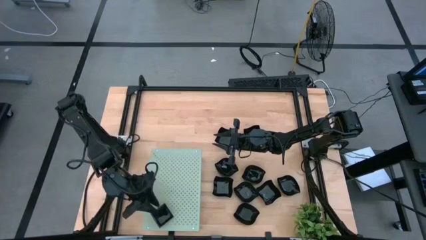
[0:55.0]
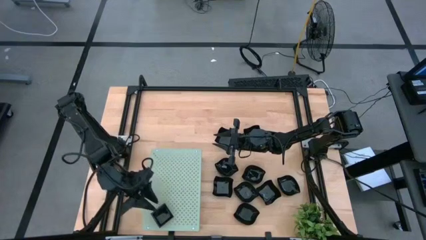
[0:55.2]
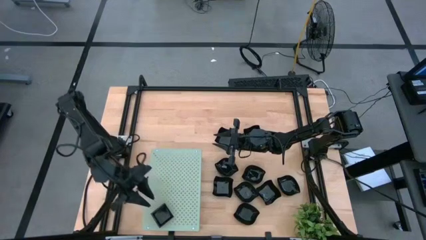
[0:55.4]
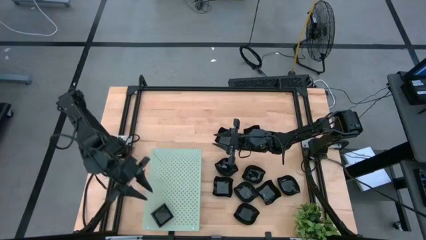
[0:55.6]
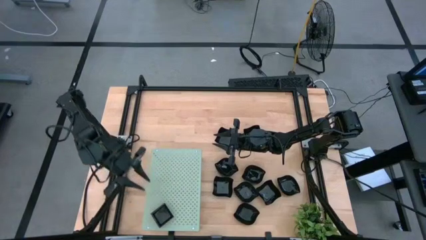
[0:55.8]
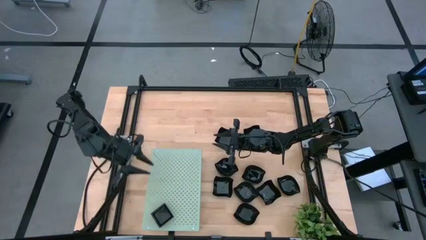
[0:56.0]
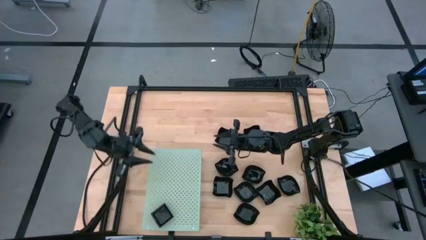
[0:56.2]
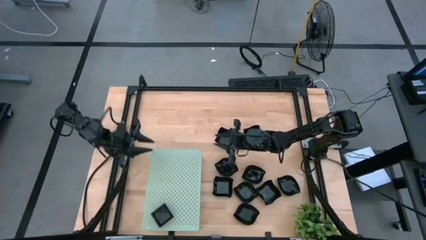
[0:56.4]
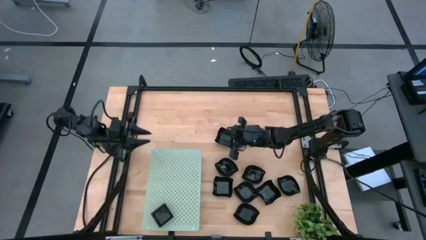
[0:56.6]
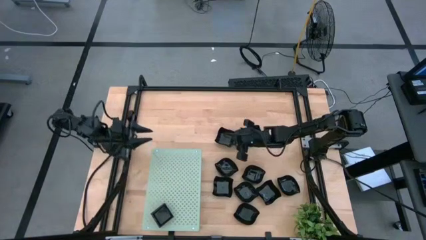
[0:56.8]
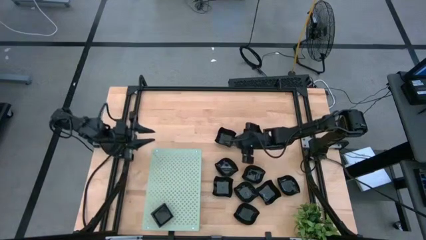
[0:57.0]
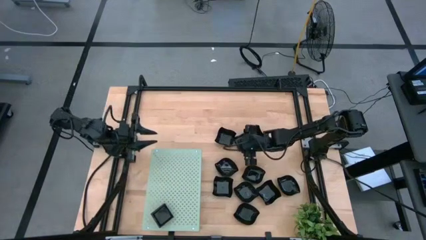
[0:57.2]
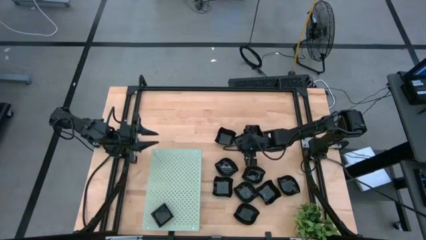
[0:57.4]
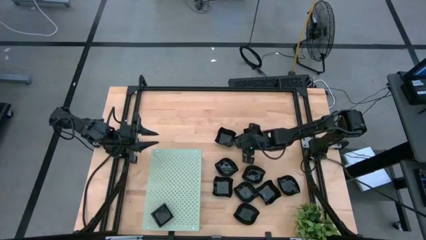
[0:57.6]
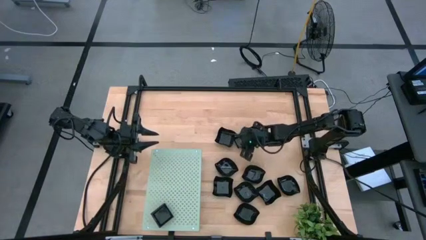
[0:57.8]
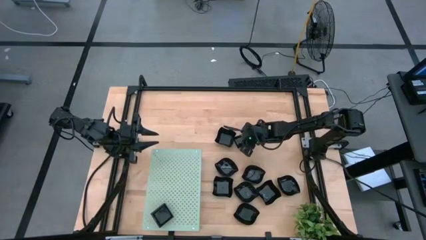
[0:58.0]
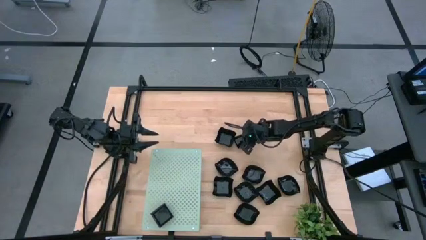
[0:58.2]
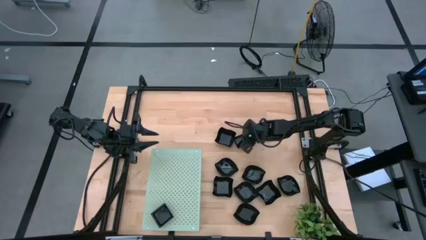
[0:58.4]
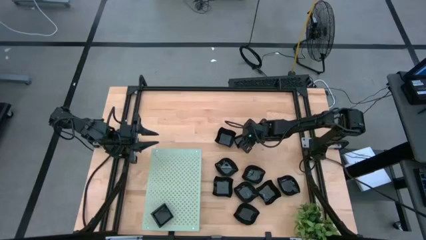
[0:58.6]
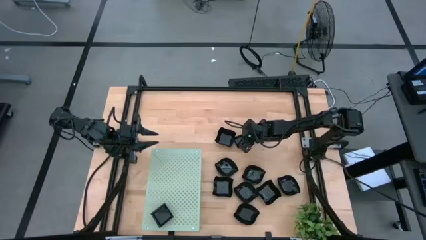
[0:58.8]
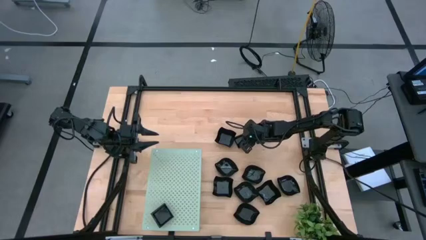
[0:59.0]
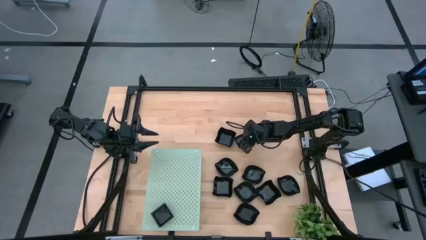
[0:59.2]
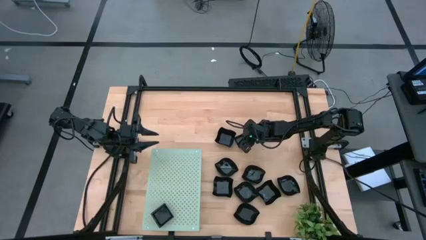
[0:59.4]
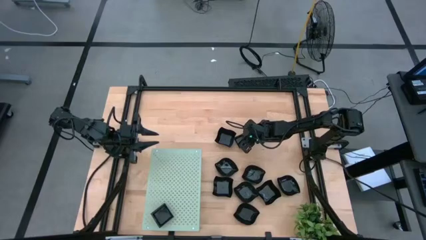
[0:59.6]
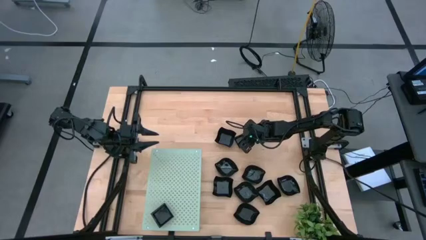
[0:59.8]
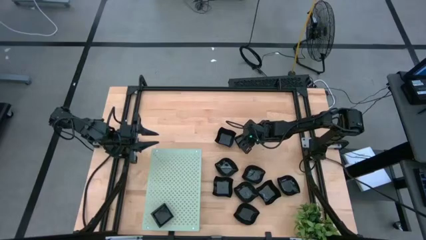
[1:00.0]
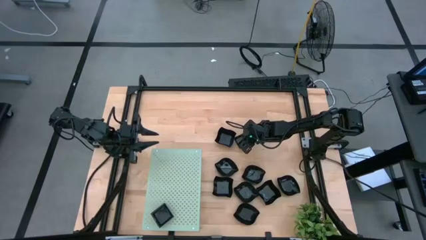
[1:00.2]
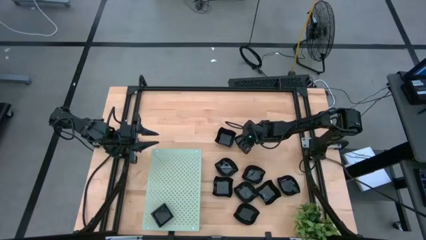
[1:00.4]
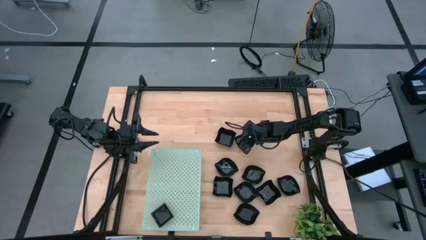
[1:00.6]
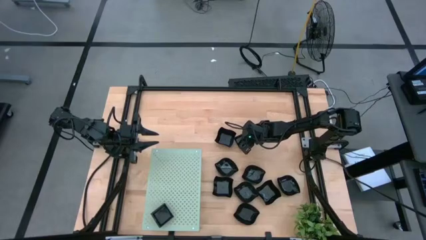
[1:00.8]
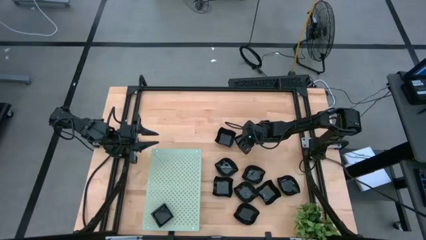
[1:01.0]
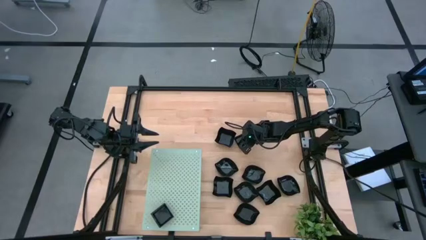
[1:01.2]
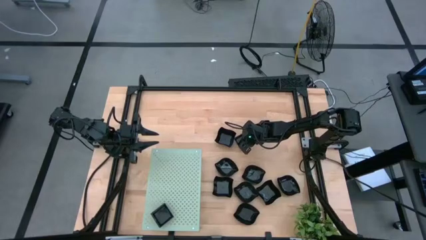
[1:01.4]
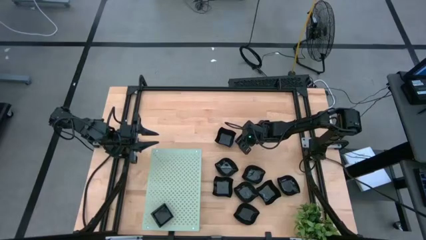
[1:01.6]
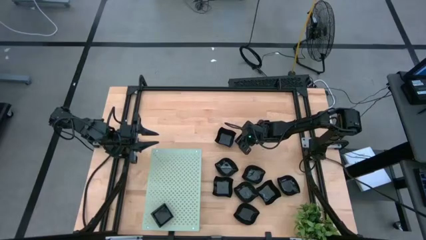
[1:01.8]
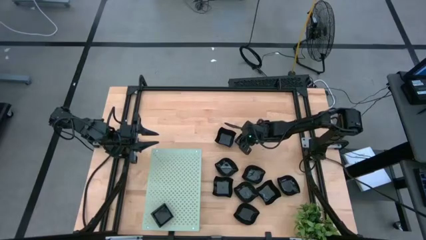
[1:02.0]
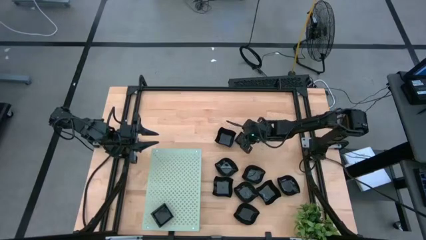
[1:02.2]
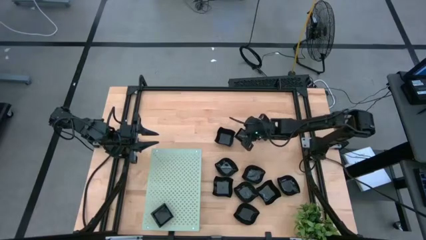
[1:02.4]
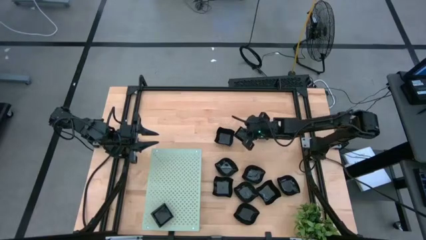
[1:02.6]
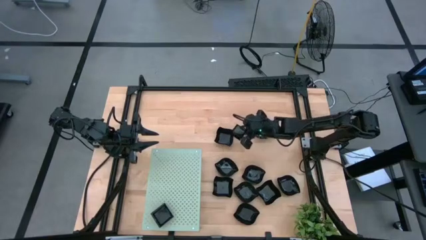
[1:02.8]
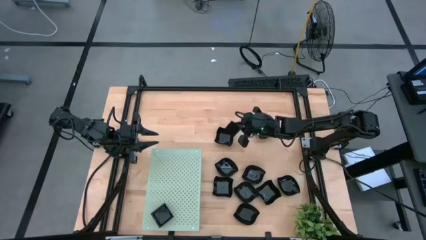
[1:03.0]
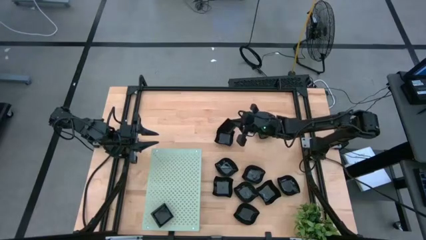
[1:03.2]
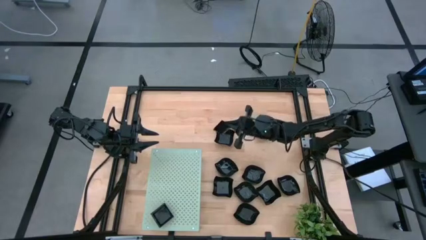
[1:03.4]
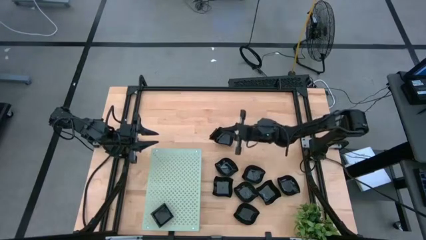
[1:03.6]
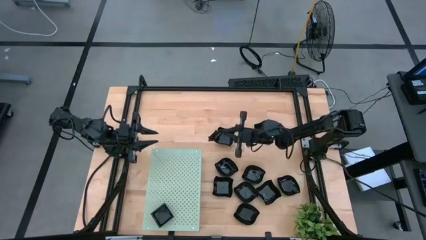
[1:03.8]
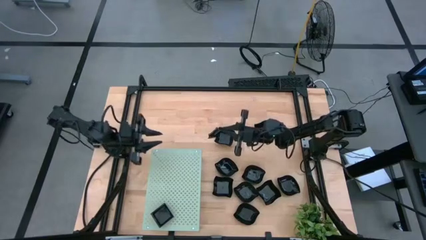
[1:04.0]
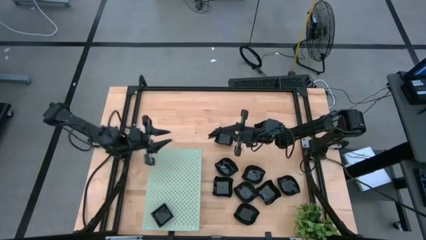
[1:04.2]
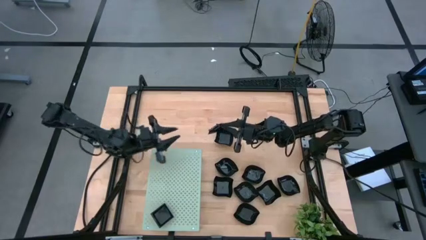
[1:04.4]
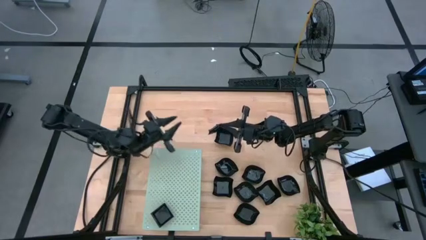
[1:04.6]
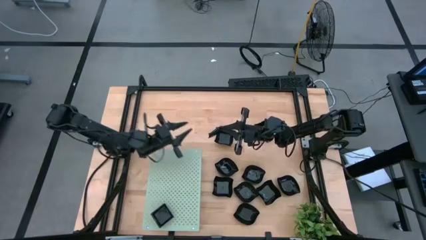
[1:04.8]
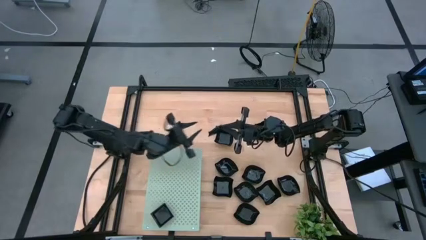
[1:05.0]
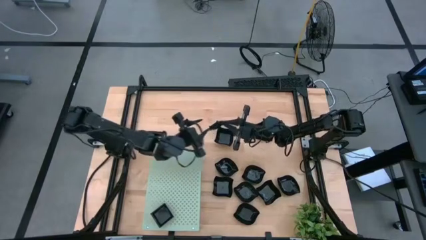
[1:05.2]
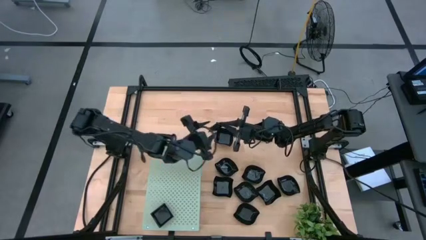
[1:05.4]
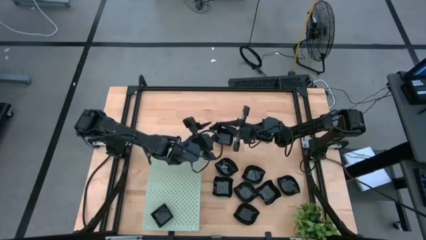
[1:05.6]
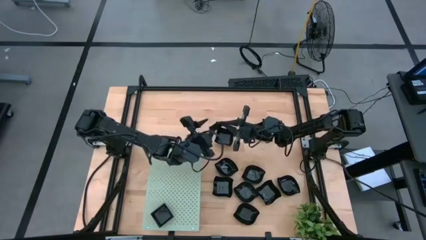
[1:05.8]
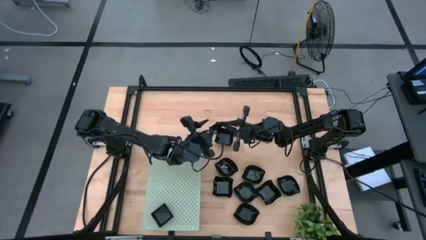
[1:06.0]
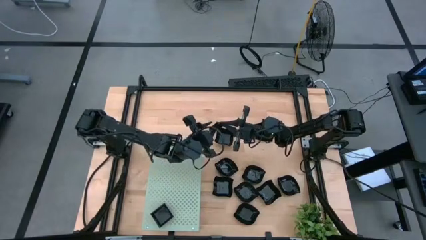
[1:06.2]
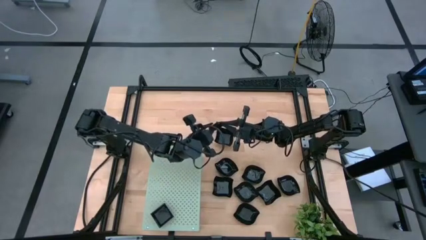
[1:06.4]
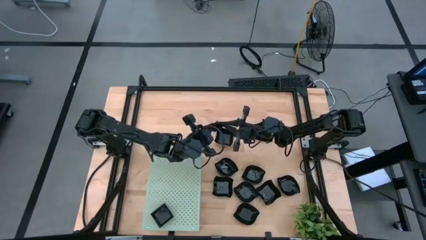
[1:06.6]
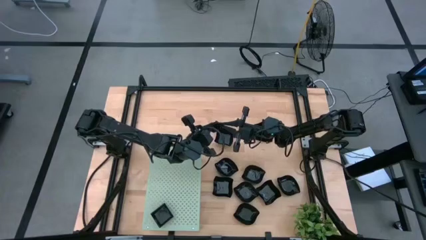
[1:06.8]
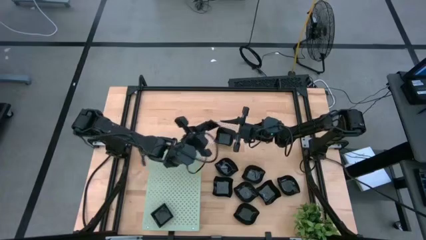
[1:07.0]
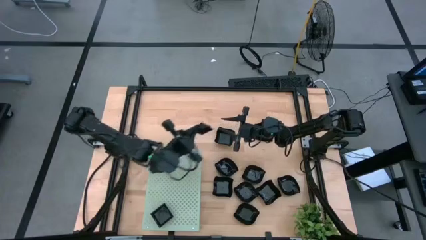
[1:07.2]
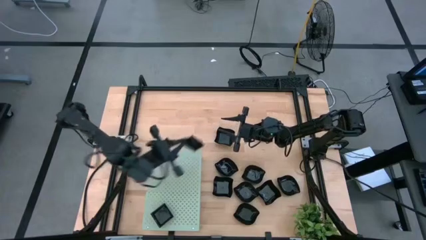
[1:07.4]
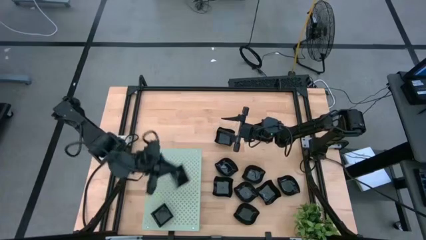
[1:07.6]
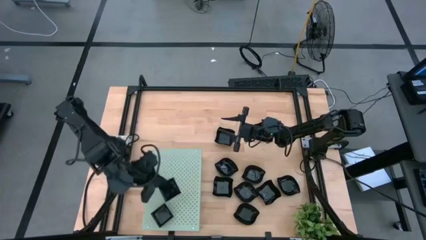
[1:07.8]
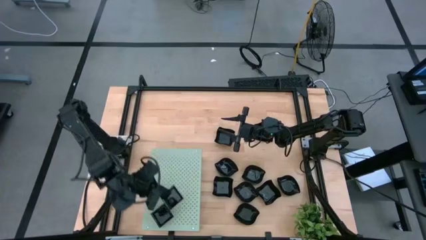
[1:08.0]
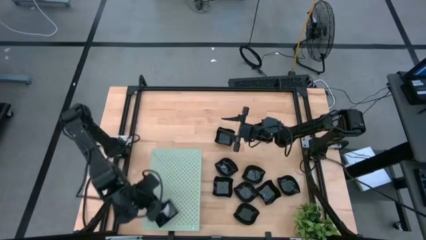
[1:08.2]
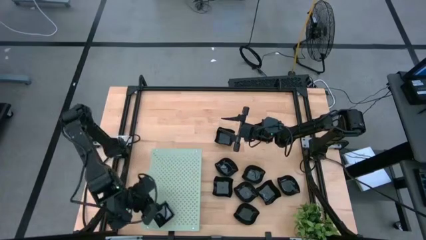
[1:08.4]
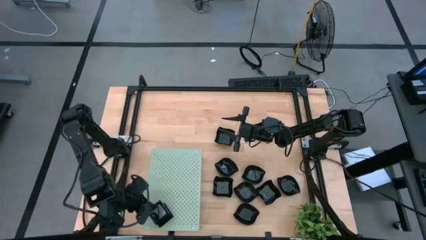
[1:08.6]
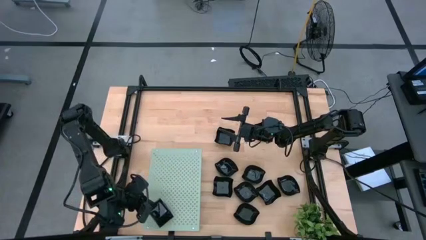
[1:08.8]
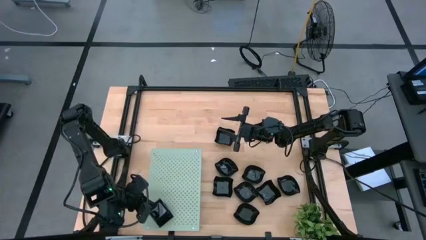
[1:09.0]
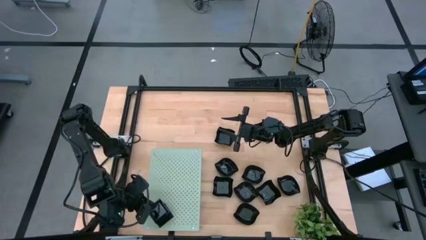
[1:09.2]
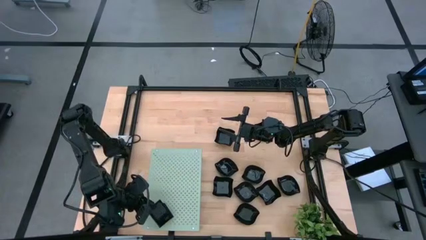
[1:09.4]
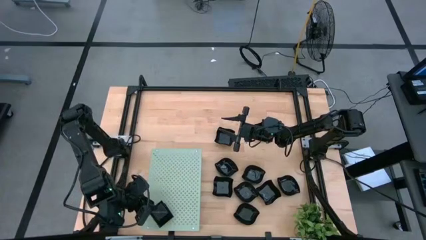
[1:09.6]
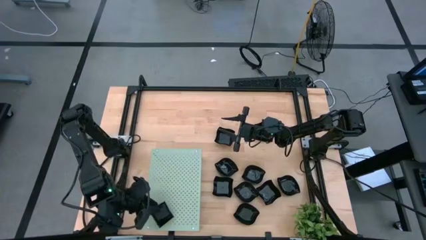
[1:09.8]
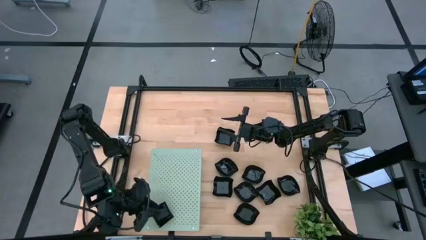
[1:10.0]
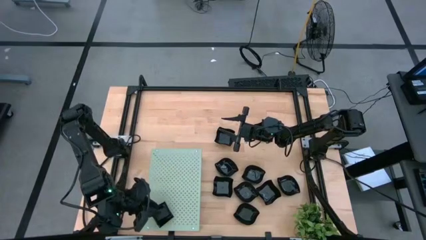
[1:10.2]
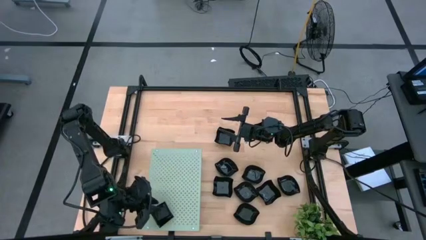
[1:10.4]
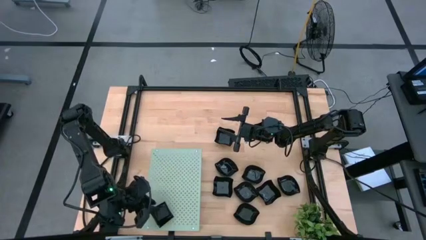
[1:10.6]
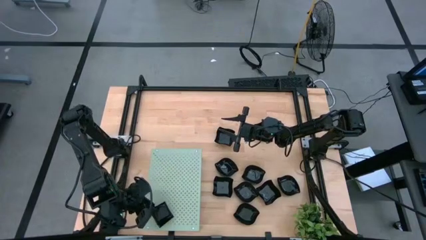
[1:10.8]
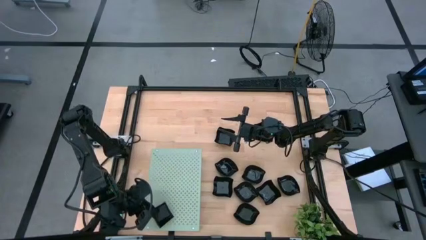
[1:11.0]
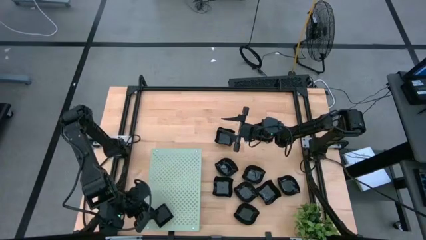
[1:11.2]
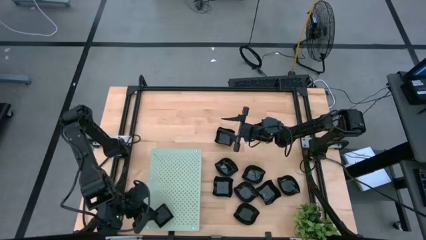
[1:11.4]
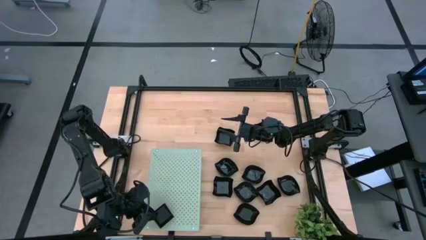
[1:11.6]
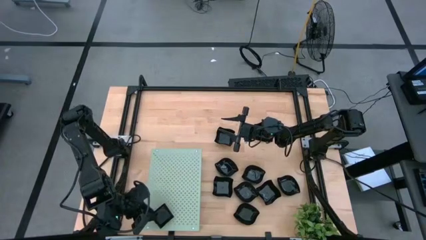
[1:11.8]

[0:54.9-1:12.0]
Task: Pick & Place Mini shaped plates
Stack the square plate on top of the other square plates on the shelf
